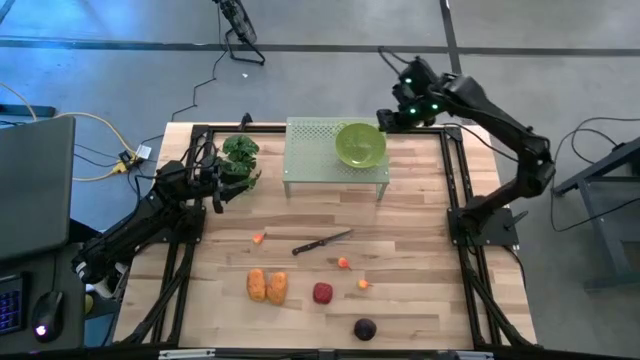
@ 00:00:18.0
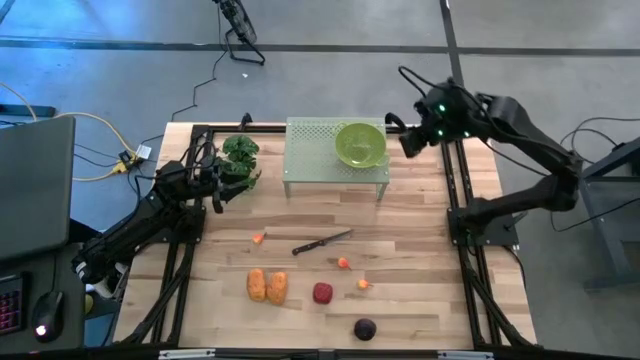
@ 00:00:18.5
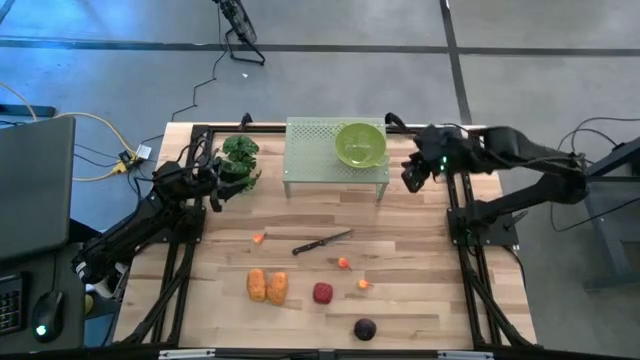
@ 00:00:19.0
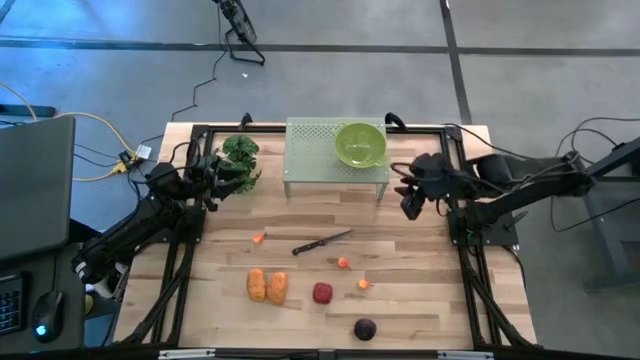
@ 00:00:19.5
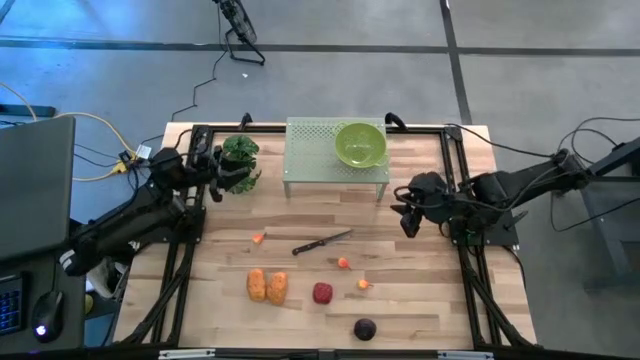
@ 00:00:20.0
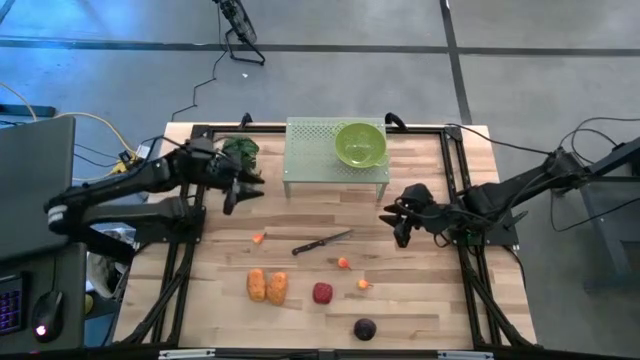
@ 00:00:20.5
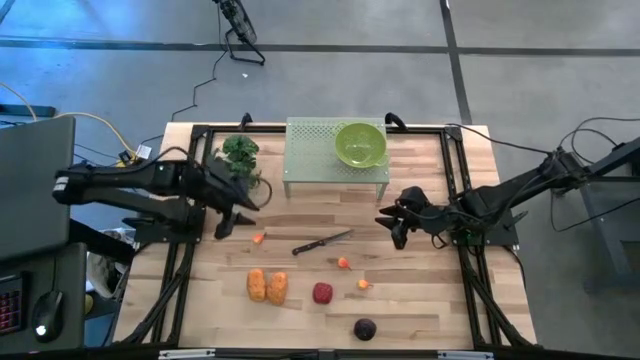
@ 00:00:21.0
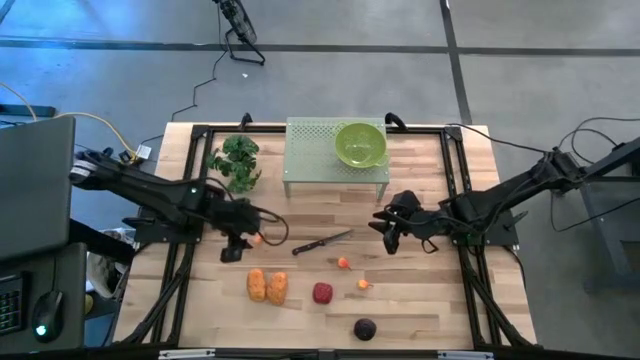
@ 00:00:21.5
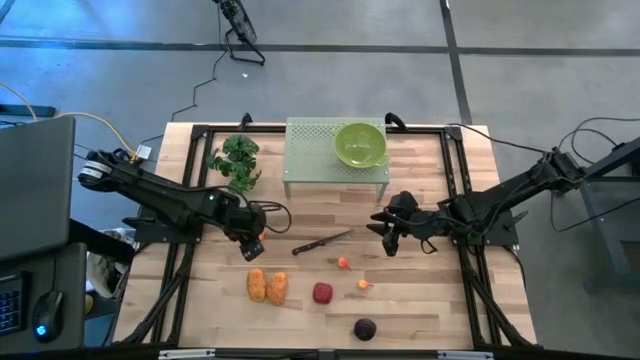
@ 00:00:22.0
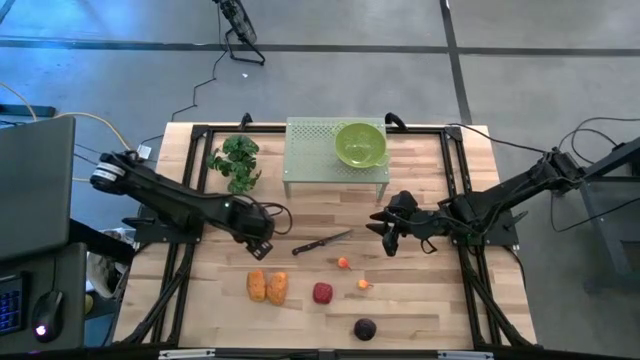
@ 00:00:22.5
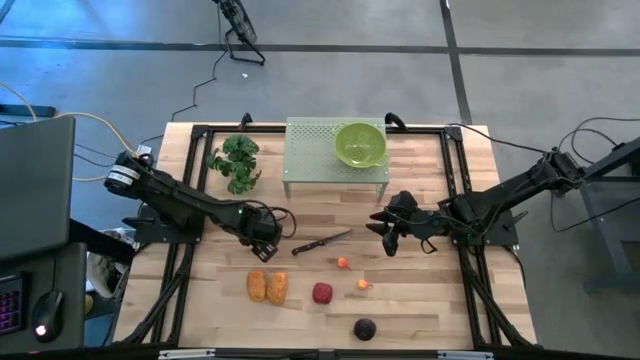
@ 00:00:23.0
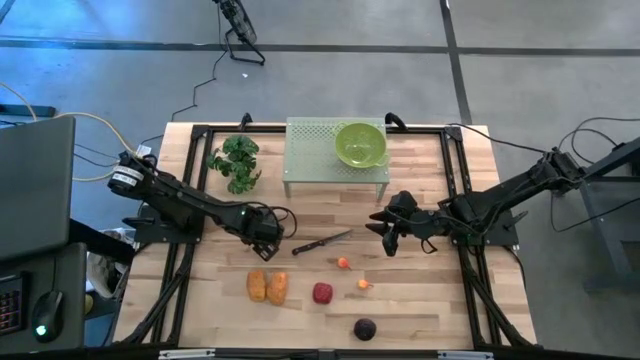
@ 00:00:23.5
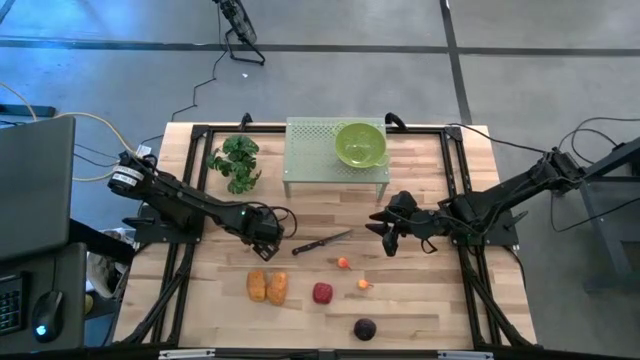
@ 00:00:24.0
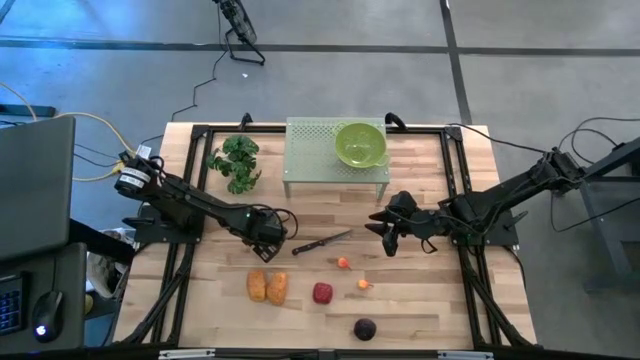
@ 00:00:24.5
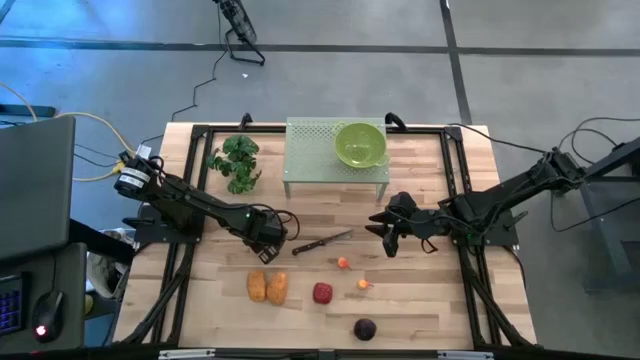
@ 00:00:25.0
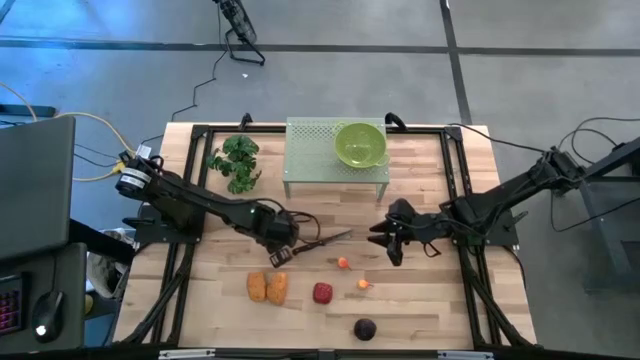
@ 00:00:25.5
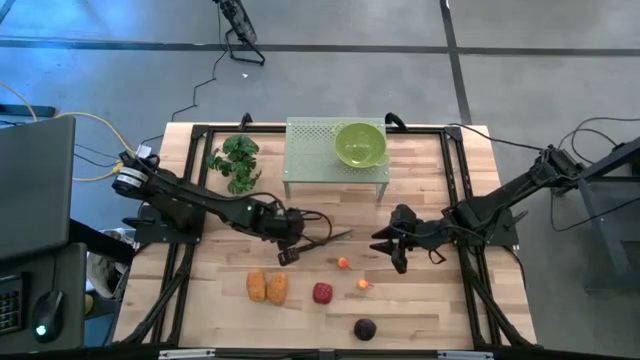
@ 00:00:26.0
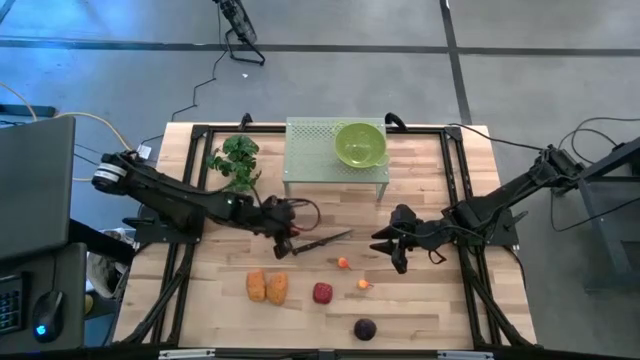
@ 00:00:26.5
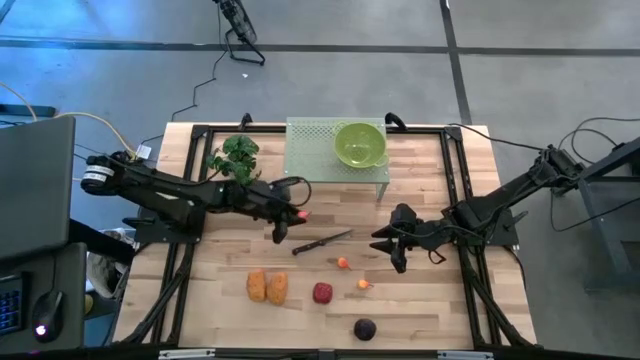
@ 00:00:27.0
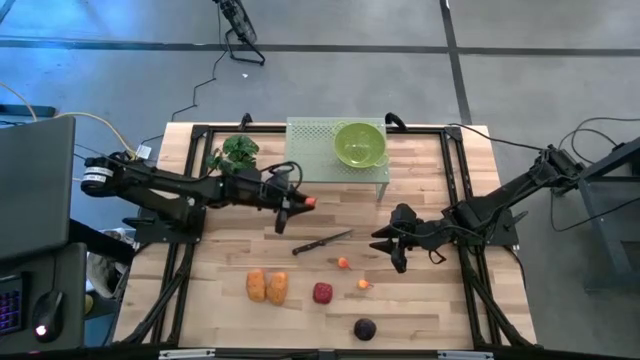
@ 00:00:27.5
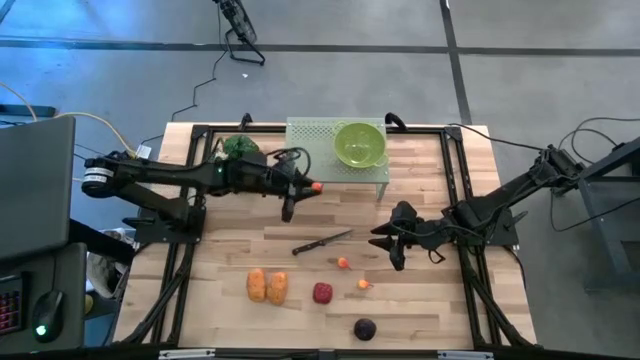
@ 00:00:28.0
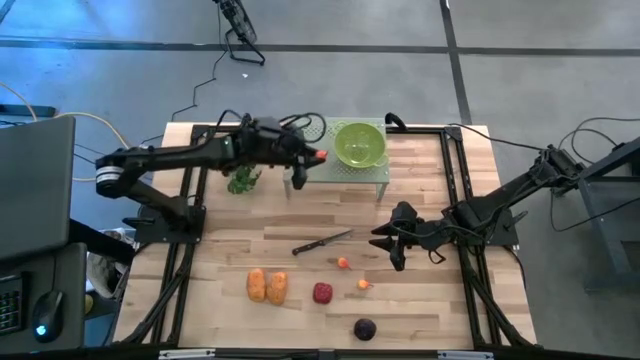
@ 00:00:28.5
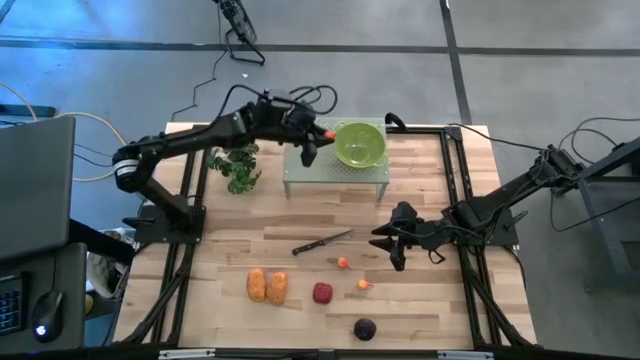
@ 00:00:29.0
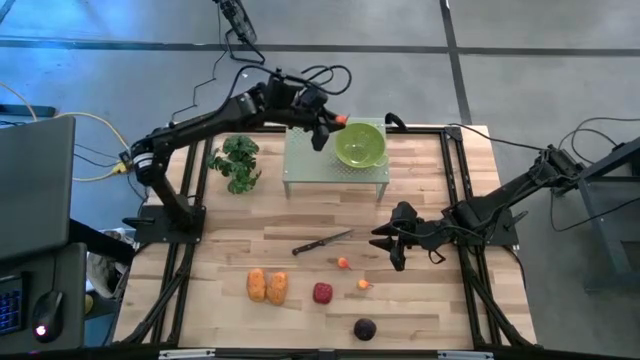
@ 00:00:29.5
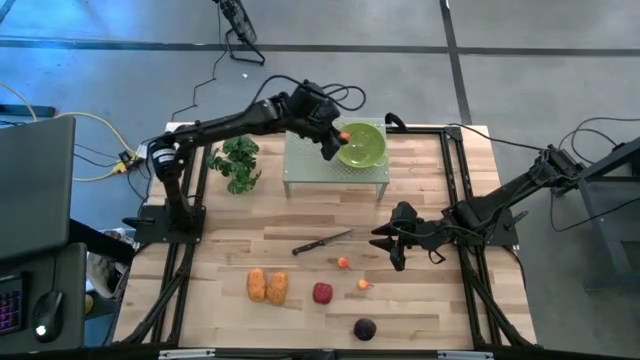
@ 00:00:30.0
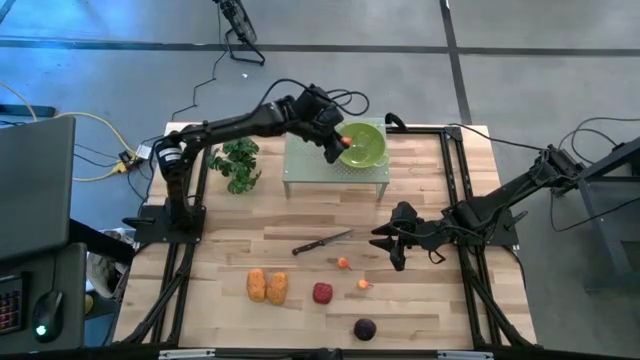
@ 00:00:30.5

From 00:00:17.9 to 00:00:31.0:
Task: Pick & Place Fruit
Put the orange peach into the green strainer bowl on the shelf

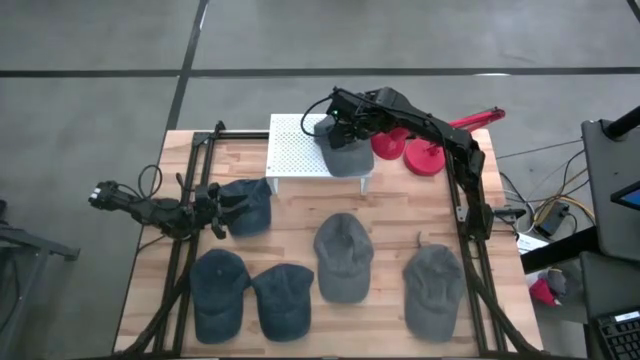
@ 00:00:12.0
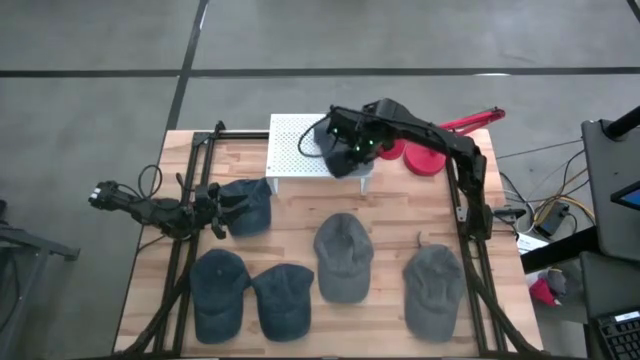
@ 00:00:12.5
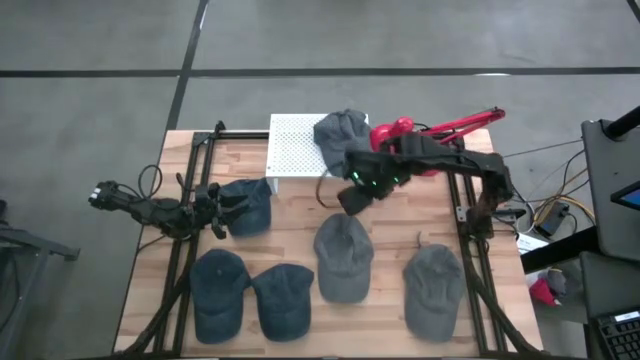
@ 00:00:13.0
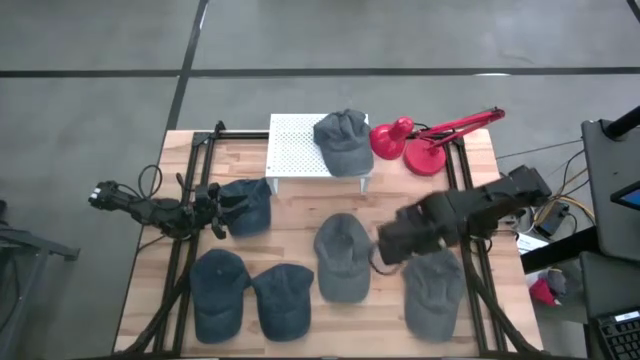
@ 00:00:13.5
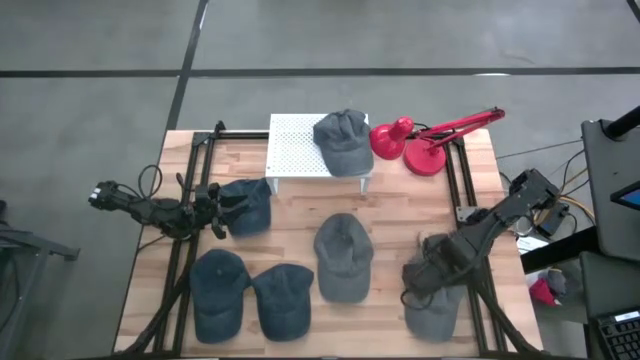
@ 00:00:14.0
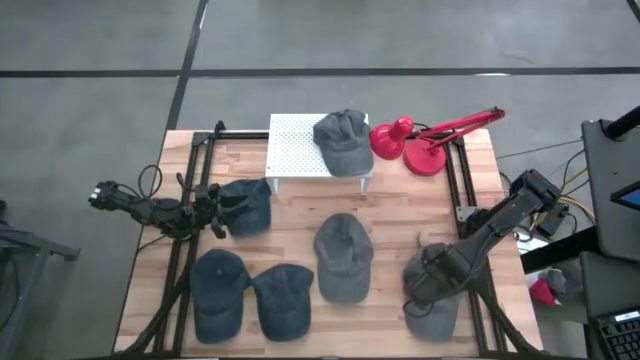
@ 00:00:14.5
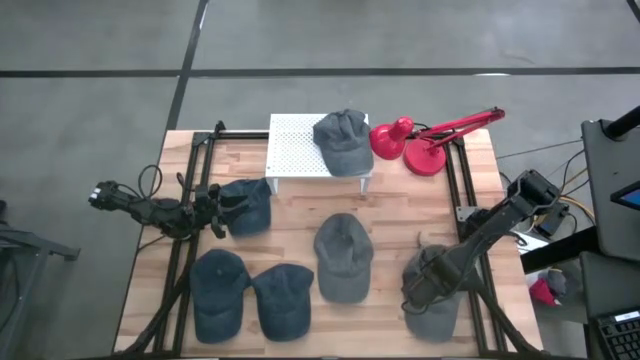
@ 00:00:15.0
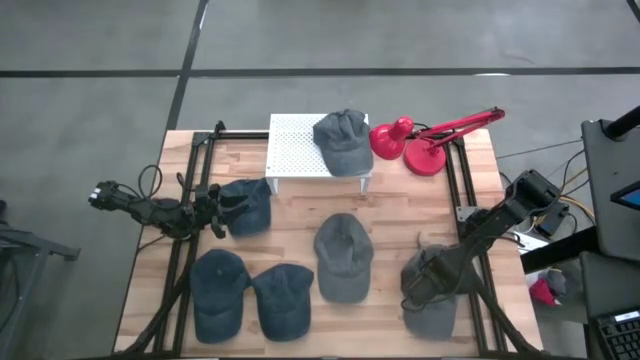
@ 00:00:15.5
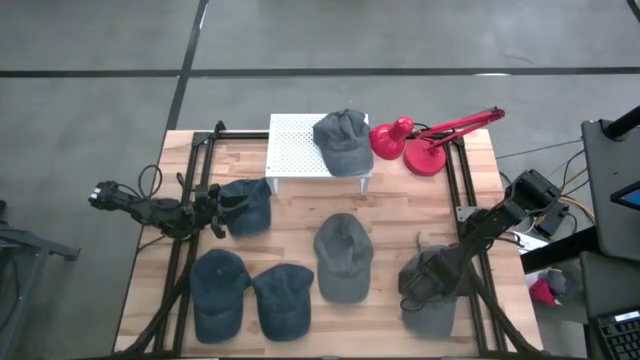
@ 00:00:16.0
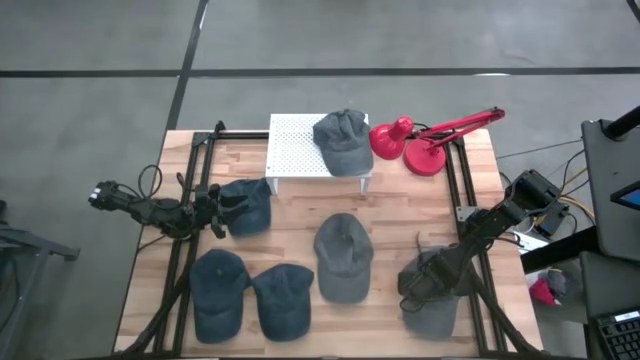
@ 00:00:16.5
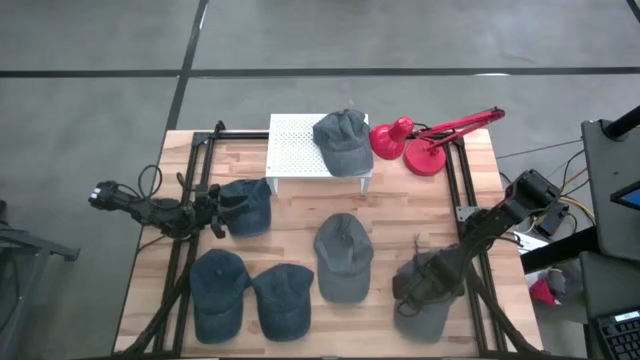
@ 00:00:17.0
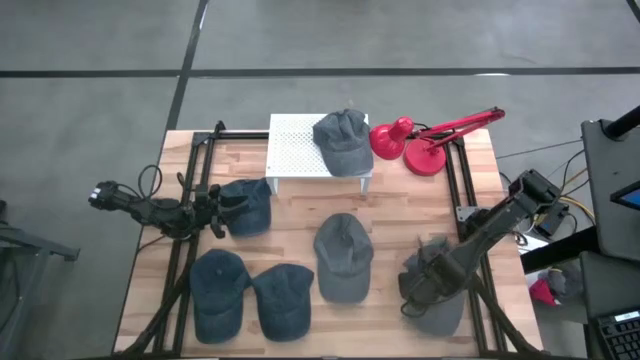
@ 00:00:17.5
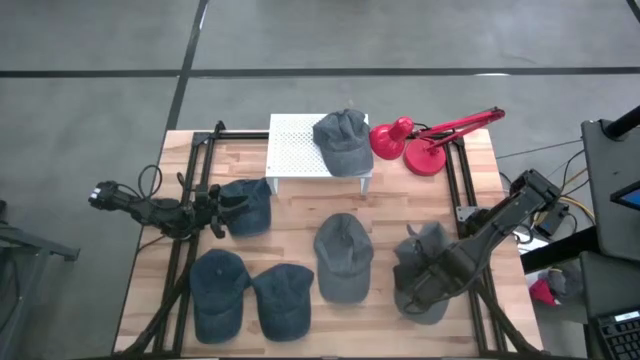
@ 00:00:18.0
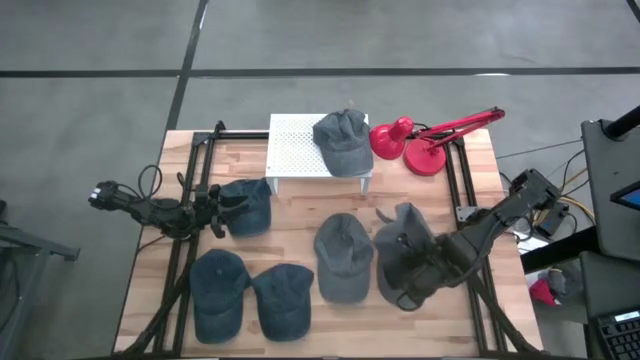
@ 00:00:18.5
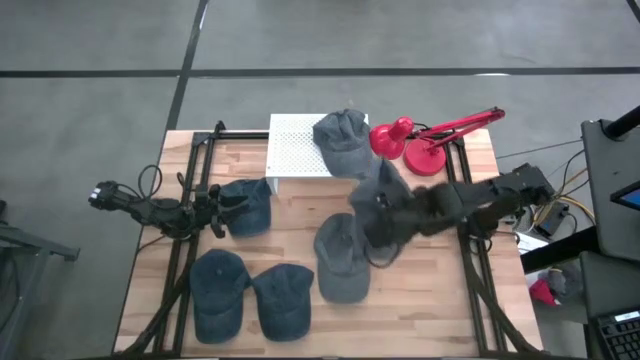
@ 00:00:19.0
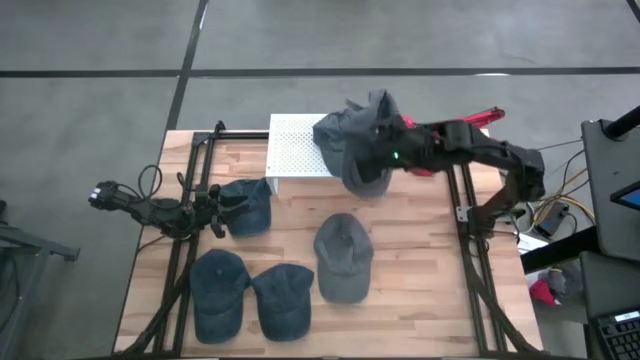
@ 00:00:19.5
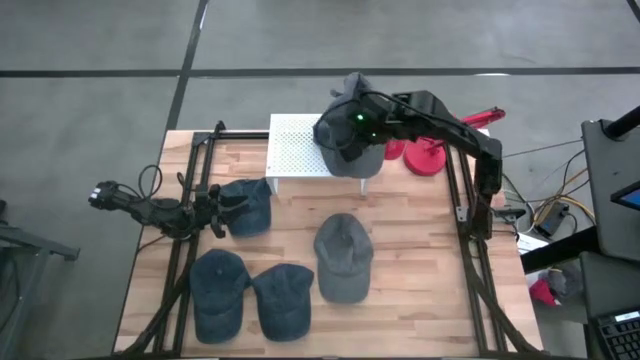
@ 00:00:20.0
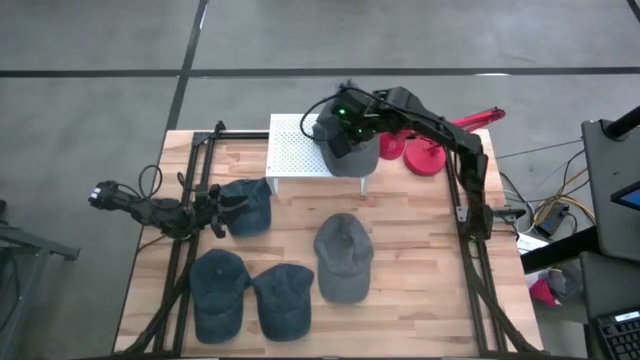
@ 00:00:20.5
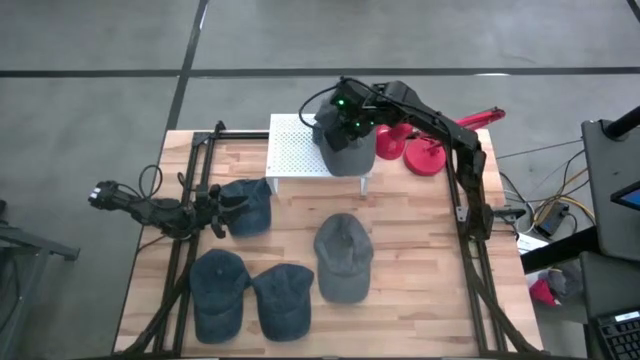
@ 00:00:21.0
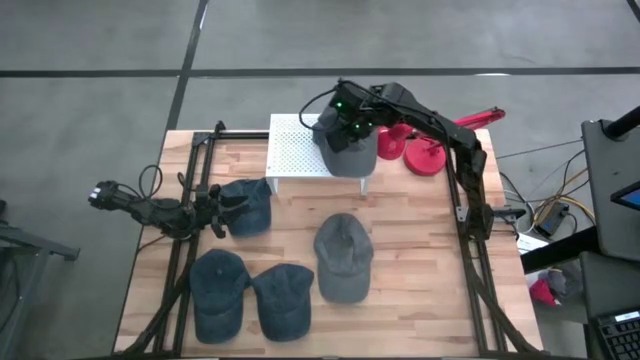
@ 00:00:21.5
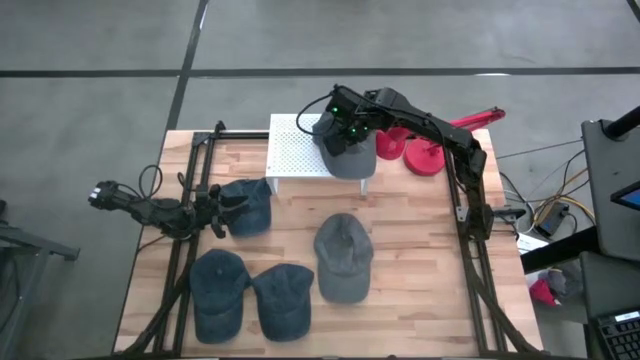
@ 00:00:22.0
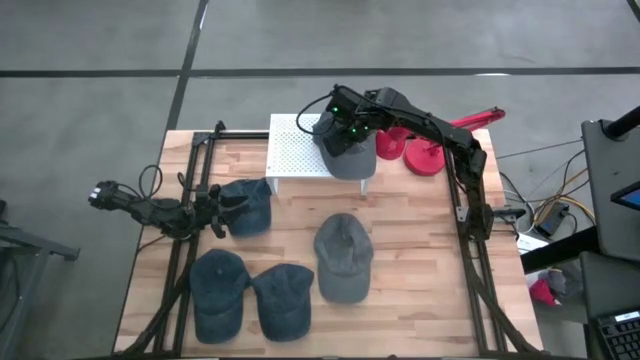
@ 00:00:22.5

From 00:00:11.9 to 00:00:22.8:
Task: Pick & Place hat
Stack the right gray cap on top of the other gray cap on the shelf
